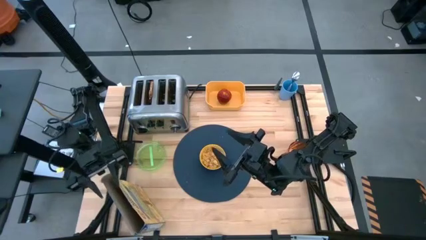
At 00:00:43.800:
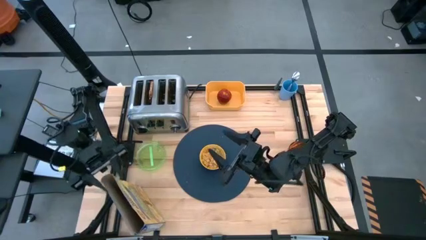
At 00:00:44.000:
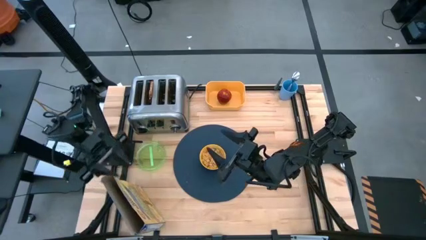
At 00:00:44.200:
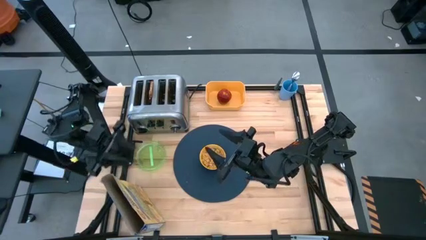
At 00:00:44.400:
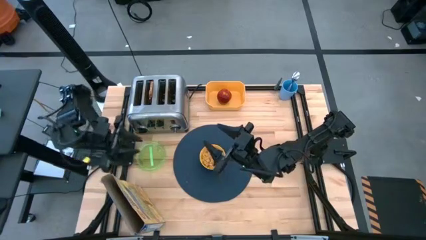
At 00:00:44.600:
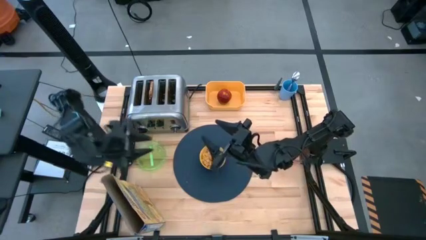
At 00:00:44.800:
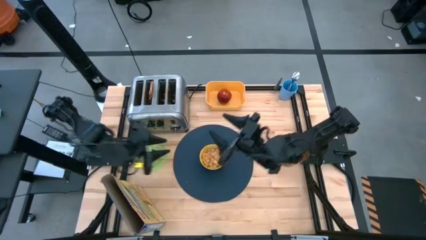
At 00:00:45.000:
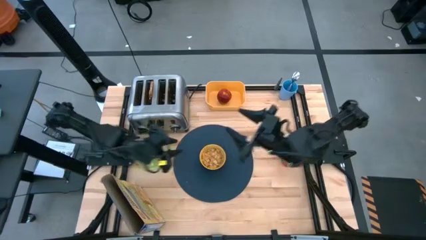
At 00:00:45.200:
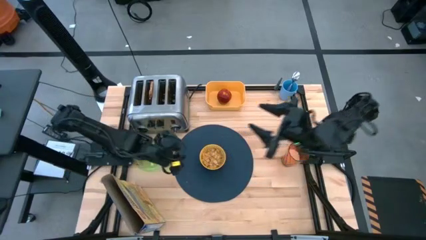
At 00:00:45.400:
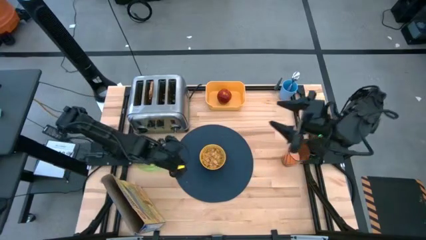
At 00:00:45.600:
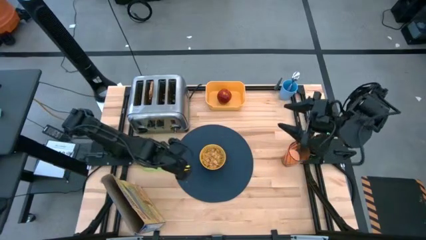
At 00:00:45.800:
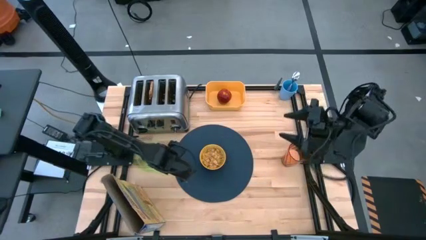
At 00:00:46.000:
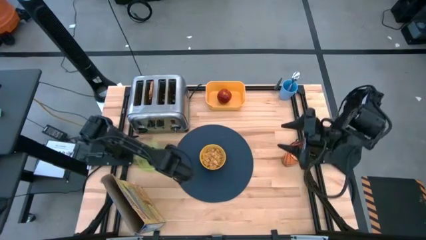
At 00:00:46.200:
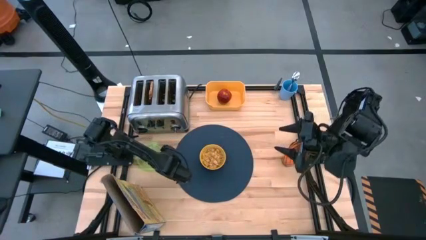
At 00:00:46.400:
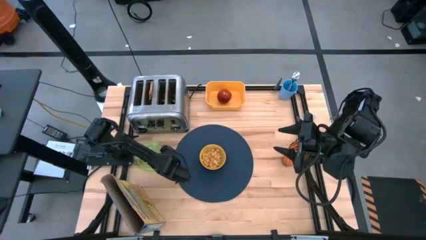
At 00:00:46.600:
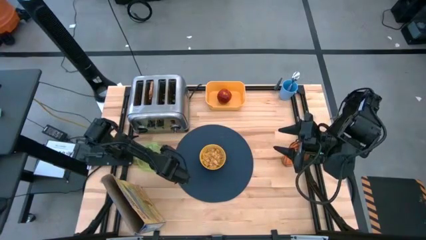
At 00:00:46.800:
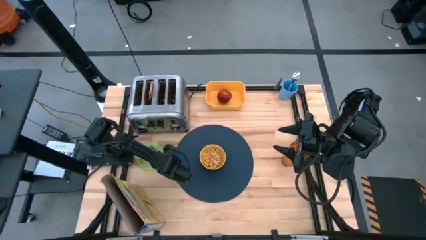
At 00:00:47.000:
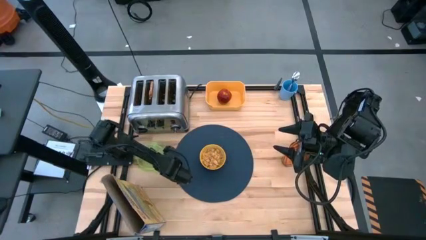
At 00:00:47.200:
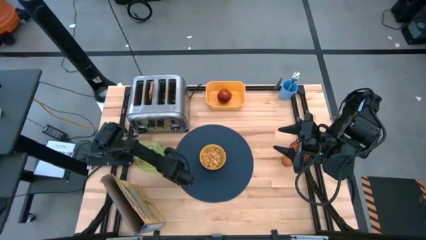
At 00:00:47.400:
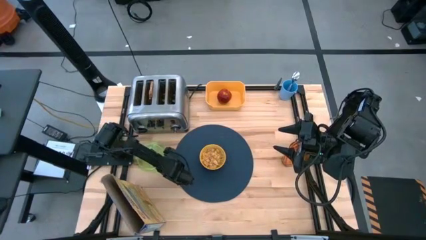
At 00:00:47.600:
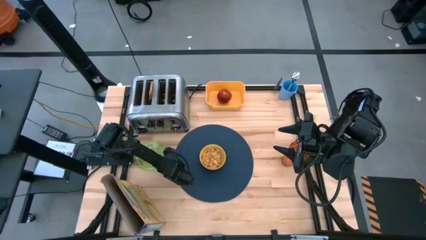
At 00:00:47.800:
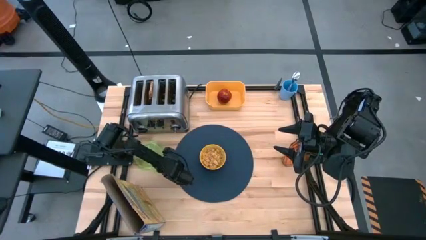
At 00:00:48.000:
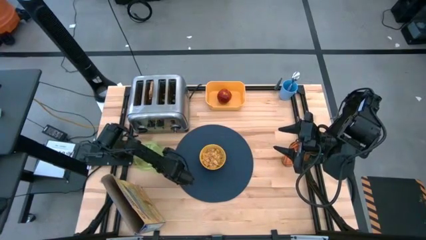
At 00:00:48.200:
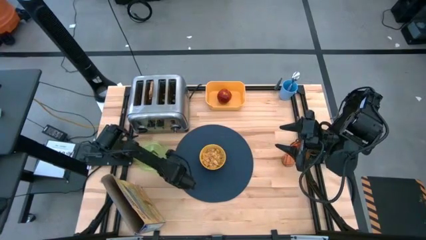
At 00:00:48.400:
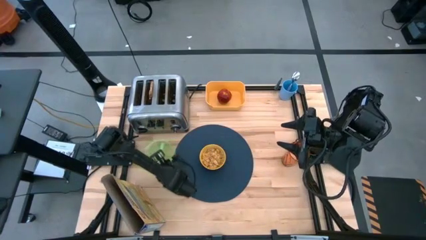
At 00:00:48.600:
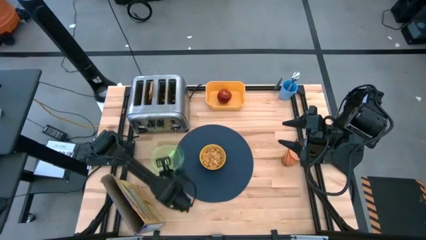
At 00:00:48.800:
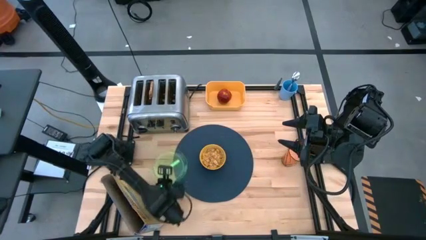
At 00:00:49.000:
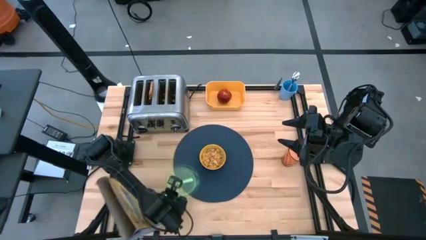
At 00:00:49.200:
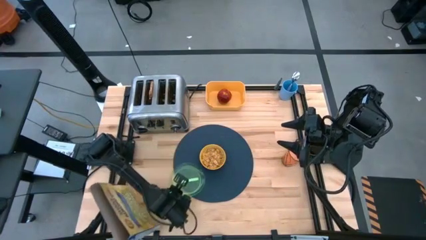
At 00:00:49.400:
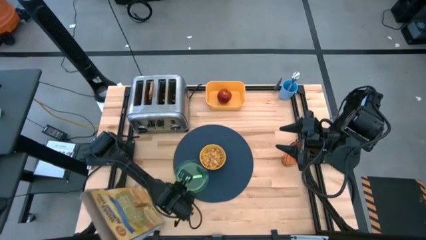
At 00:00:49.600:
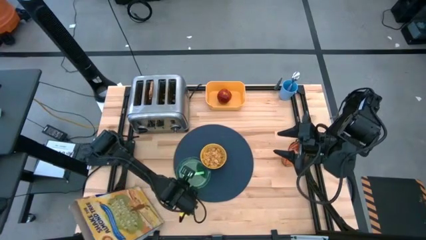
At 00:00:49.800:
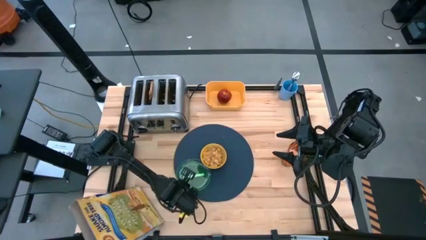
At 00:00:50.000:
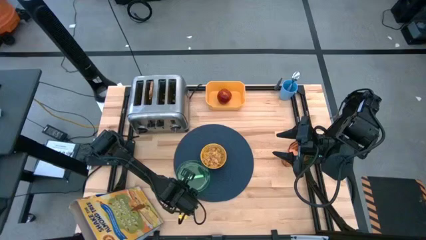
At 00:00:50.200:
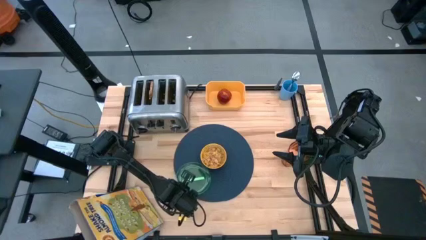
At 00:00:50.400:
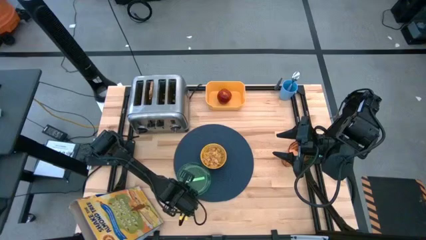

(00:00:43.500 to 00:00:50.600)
Task: Arrange a breakfast setting
Put the green plate on the blue table mat

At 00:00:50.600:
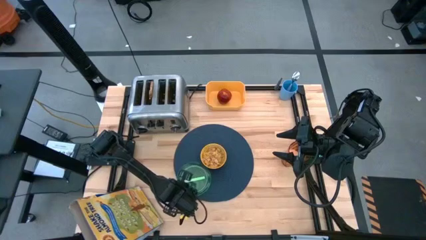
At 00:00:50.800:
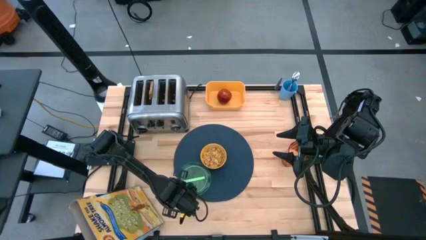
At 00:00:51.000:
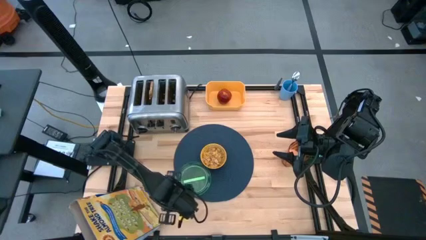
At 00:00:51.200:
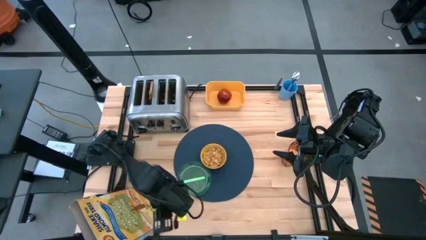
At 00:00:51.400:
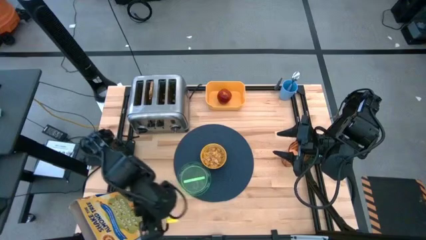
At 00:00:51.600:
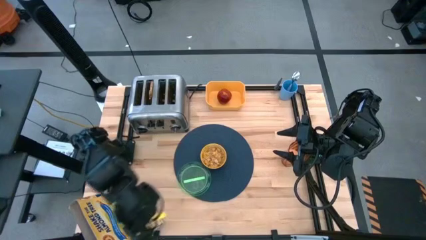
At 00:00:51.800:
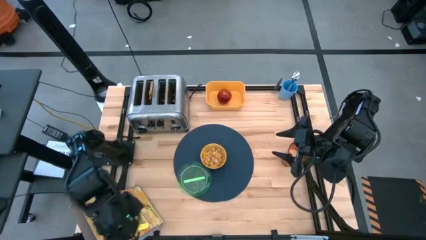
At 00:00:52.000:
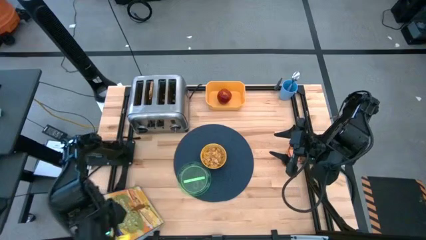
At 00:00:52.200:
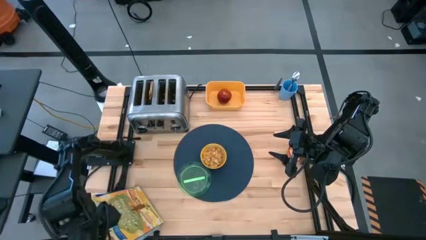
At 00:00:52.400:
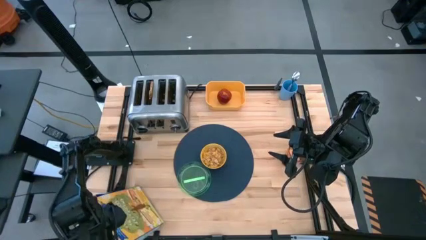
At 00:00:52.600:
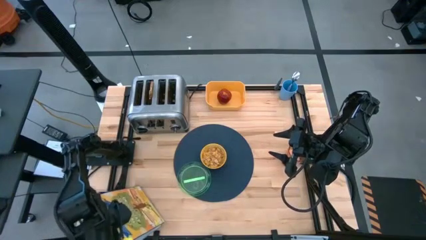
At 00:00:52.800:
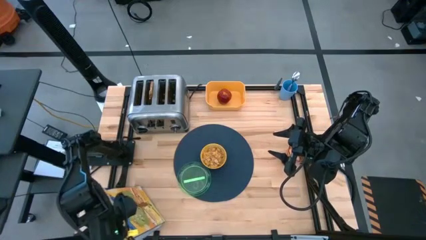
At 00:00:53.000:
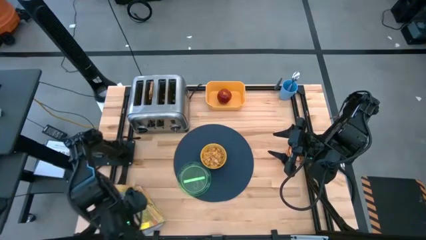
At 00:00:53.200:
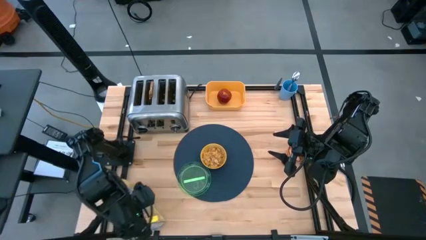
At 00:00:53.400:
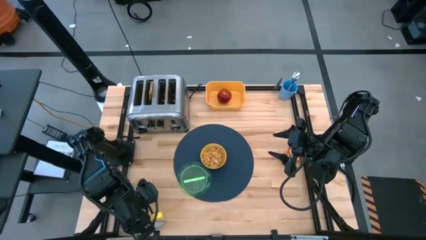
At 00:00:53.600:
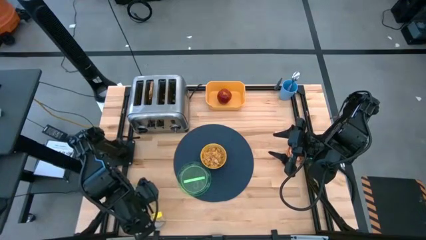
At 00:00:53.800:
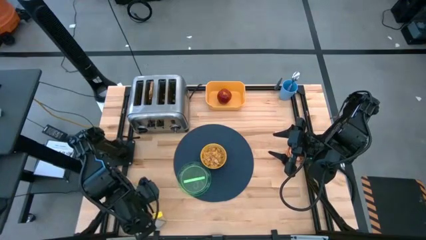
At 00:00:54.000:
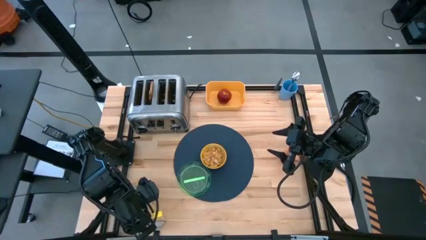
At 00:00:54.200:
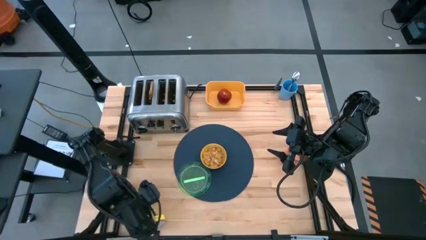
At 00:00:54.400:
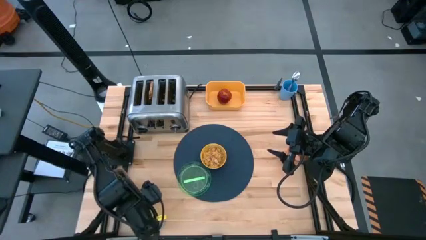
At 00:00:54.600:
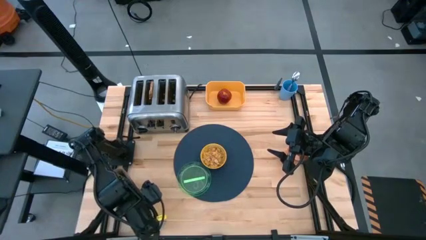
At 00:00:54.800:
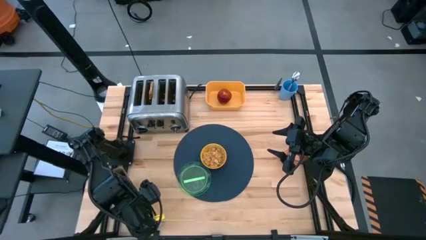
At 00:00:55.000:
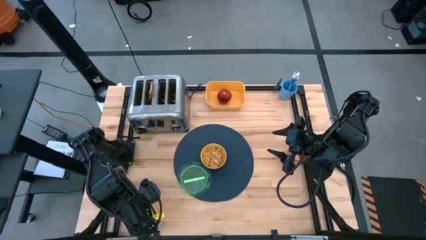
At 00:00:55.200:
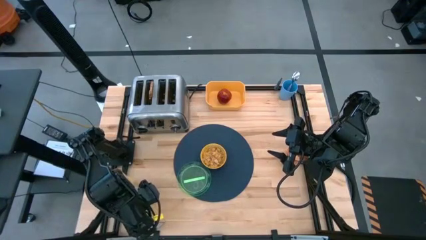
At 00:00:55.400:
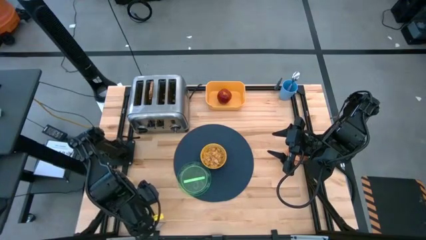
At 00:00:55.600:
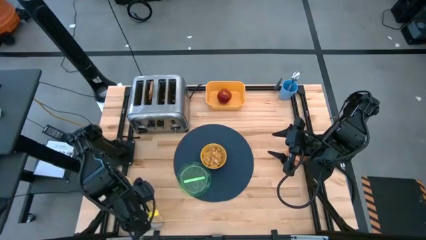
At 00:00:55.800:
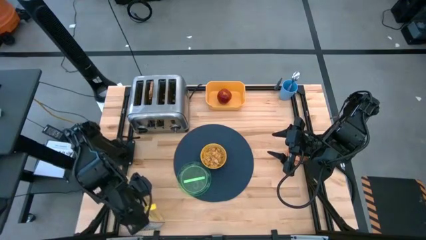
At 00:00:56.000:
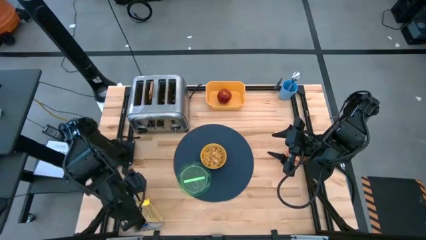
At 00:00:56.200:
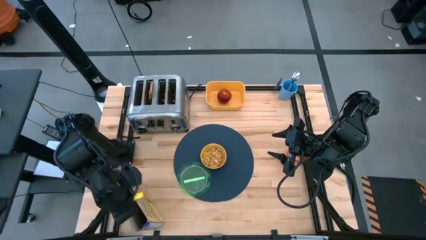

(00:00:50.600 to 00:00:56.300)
Adjust the cereal box

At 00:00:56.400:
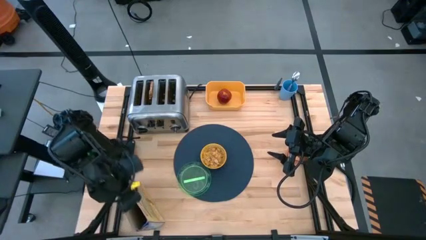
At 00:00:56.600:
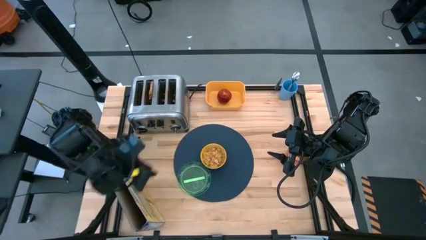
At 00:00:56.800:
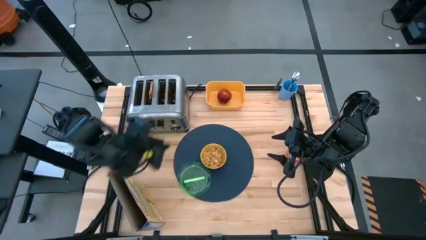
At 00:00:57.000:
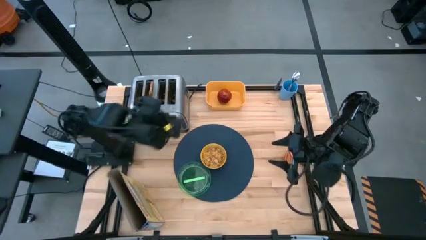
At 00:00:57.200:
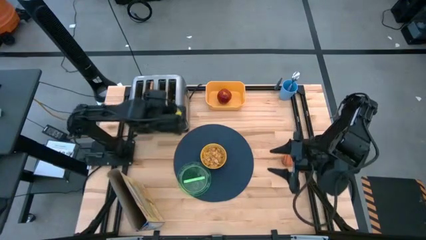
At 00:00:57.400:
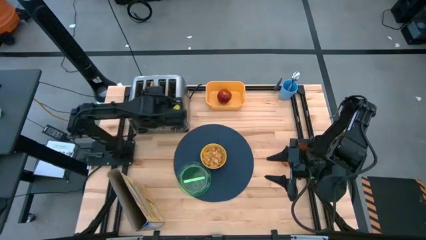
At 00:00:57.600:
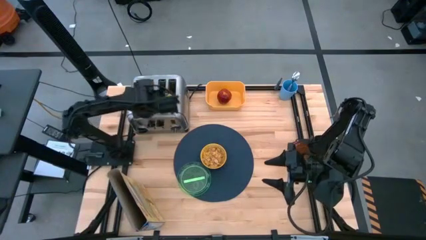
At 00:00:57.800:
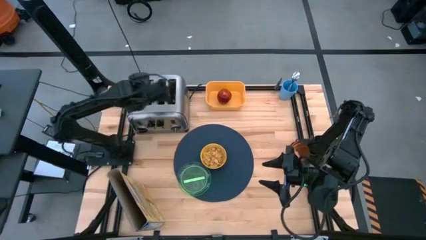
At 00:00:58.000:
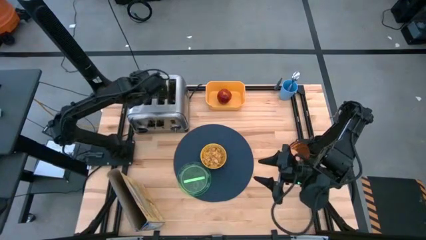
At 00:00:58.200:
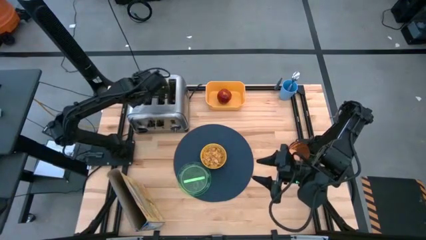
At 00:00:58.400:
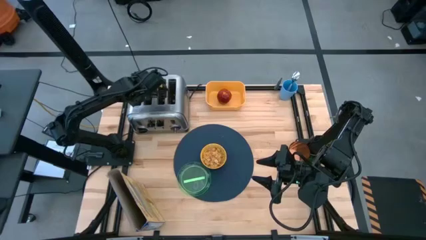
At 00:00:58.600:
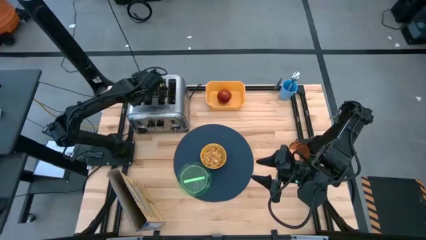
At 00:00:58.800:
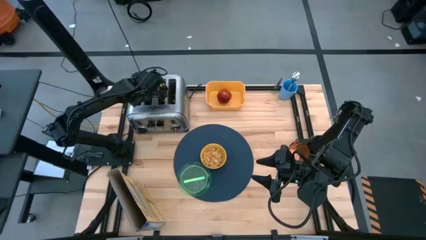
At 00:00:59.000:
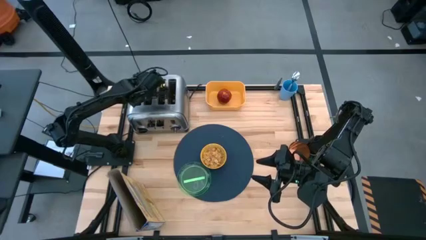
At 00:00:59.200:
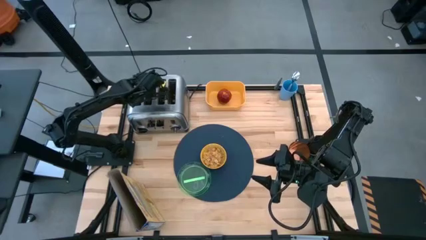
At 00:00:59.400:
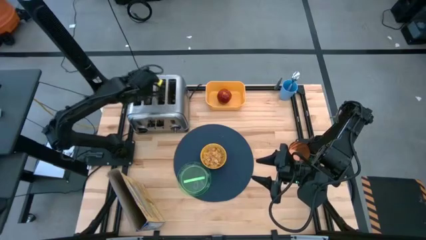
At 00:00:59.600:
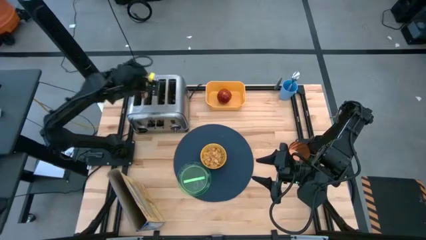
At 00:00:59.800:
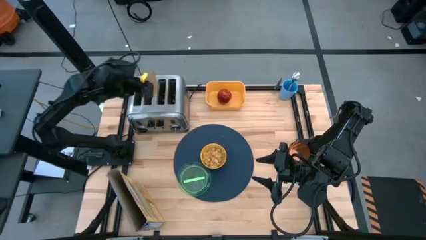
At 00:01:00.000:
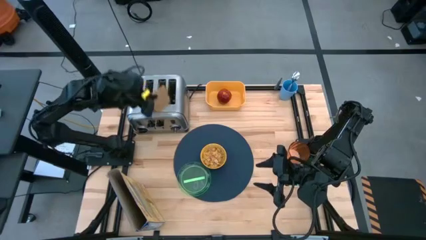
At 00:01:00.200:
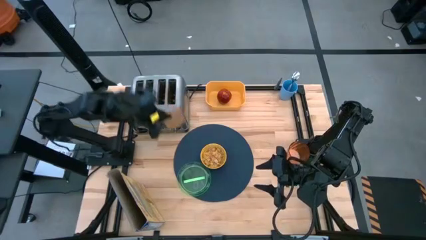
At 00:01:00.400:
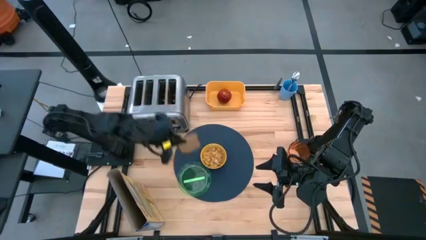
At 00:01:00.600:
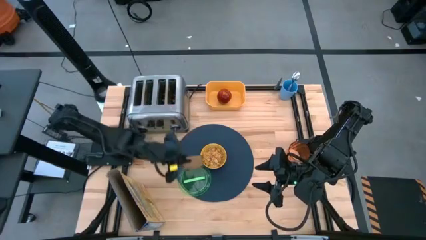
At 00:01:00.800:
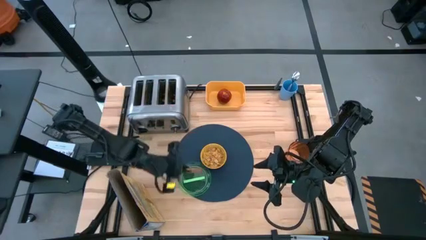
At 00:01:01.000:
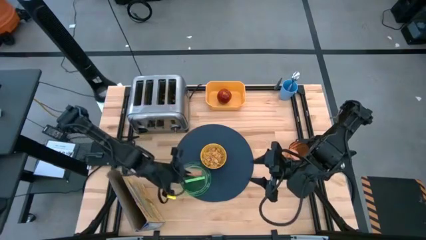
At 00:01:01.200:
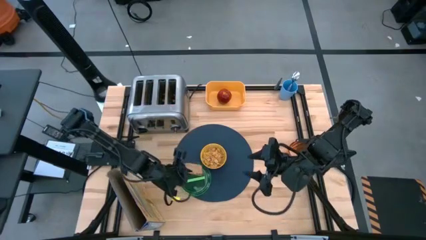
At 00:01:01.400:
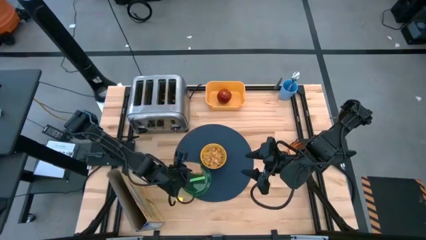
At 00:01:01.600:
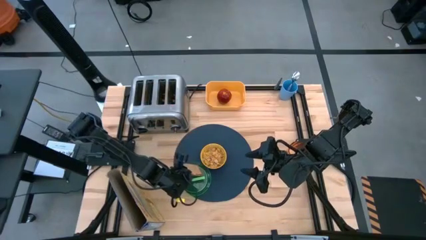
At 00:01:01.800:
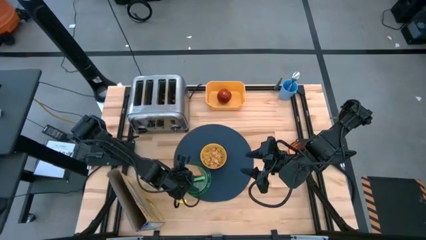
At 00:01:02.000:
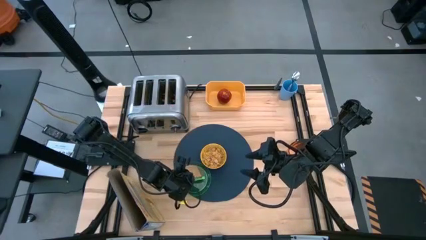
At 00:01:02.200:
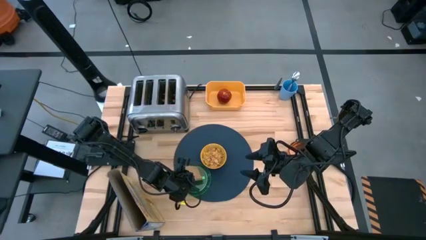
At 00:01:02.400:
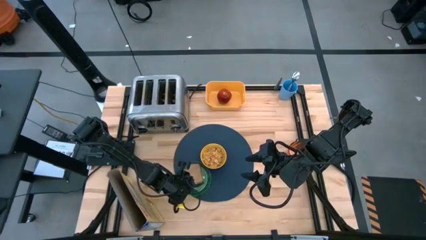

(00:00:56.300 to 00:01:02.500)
Put the bread on the green plate
